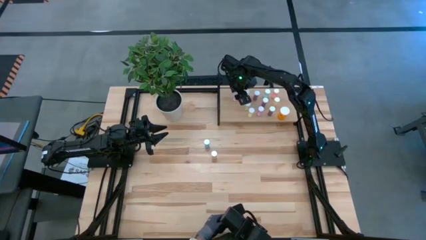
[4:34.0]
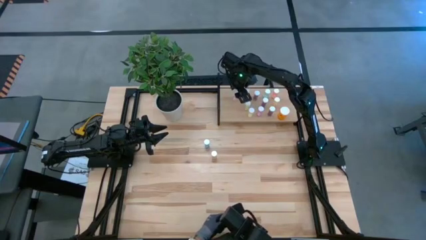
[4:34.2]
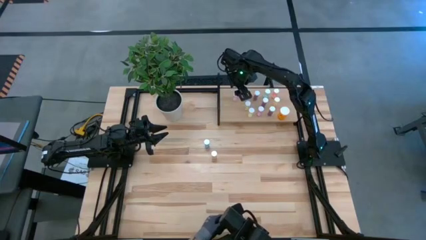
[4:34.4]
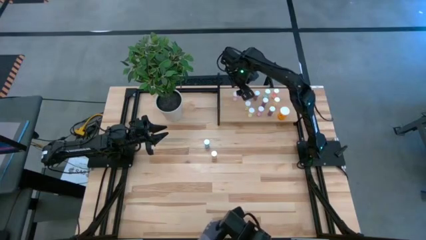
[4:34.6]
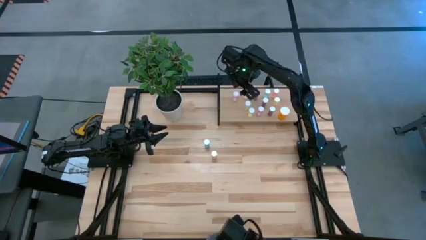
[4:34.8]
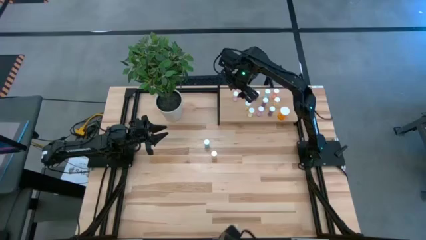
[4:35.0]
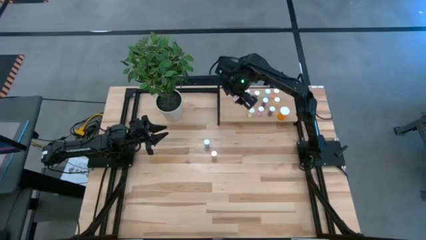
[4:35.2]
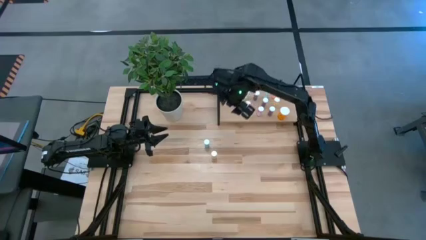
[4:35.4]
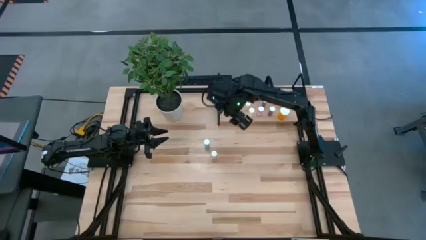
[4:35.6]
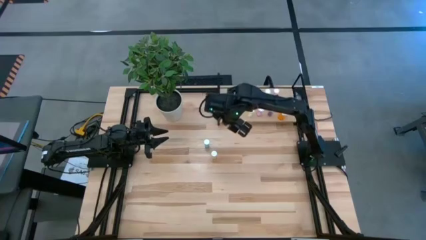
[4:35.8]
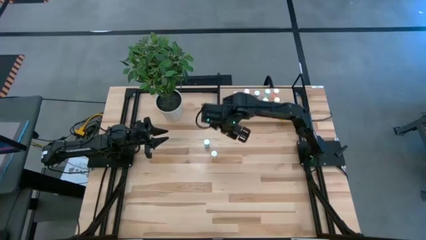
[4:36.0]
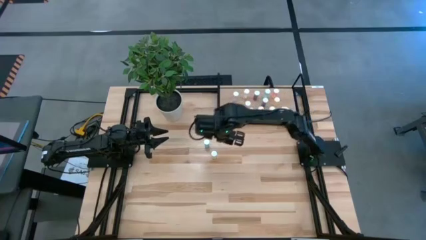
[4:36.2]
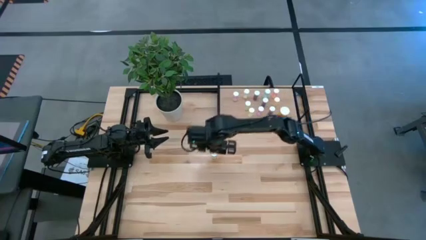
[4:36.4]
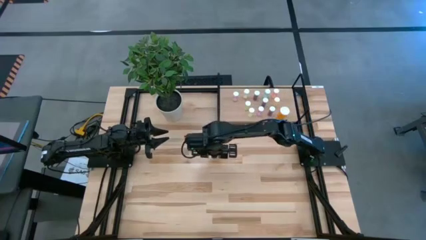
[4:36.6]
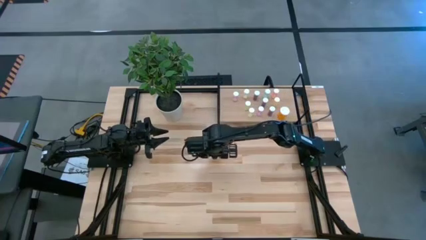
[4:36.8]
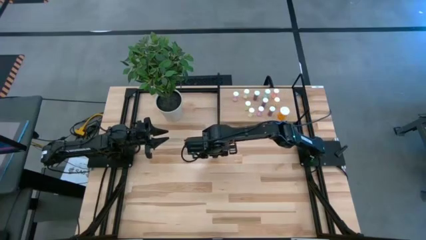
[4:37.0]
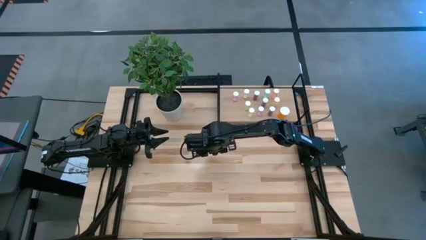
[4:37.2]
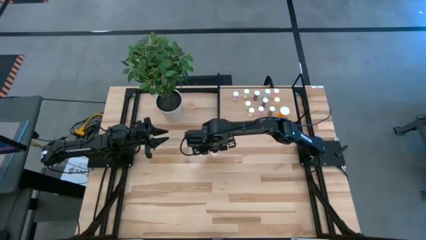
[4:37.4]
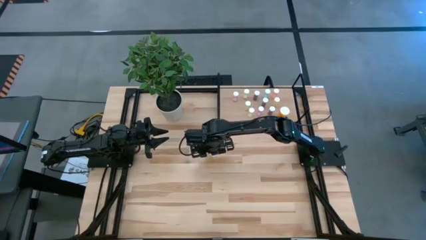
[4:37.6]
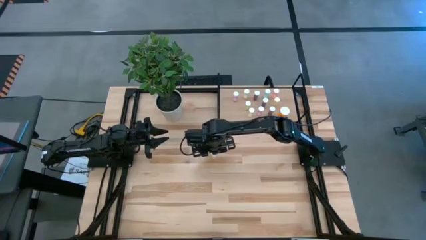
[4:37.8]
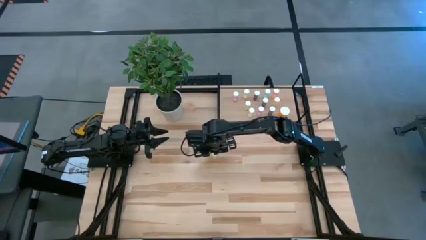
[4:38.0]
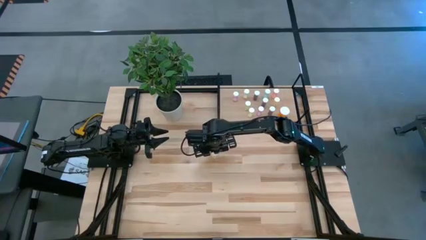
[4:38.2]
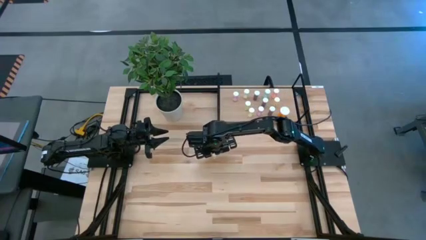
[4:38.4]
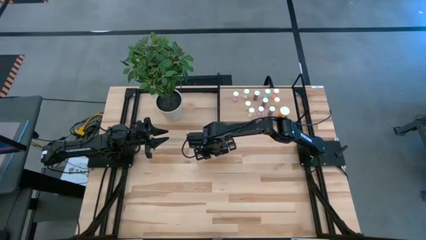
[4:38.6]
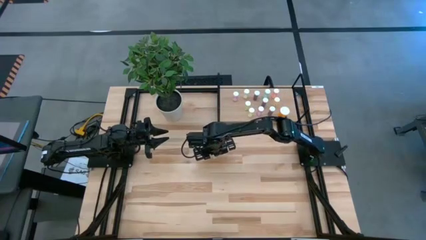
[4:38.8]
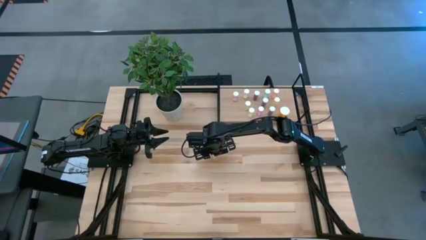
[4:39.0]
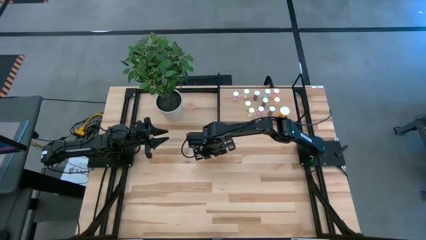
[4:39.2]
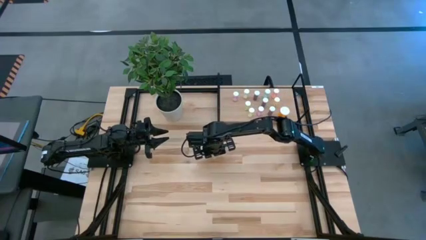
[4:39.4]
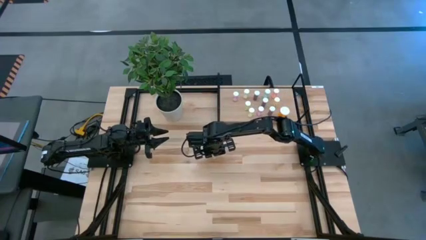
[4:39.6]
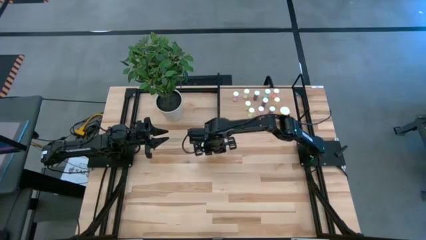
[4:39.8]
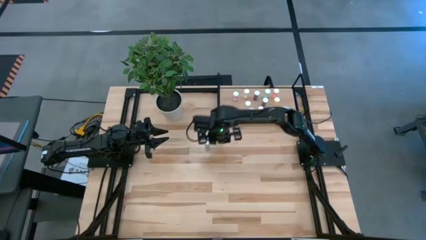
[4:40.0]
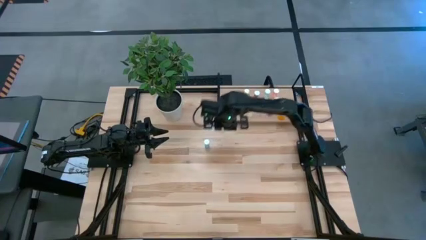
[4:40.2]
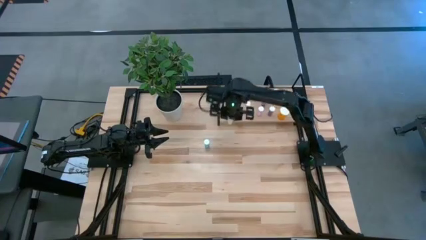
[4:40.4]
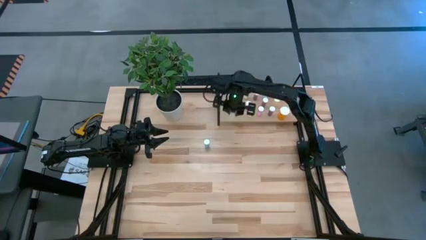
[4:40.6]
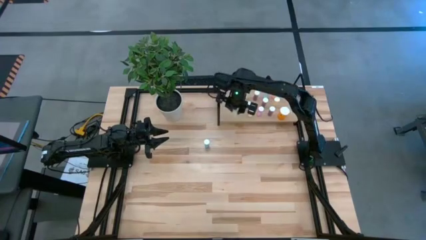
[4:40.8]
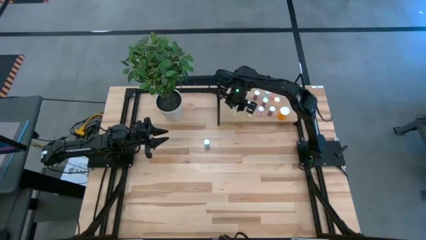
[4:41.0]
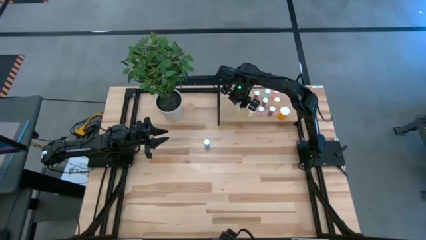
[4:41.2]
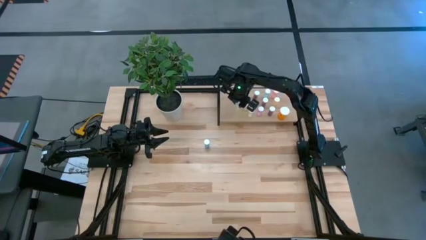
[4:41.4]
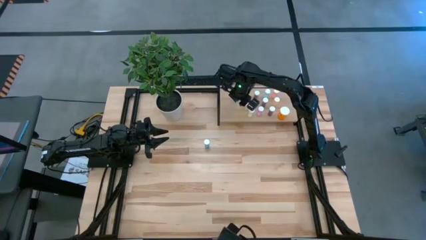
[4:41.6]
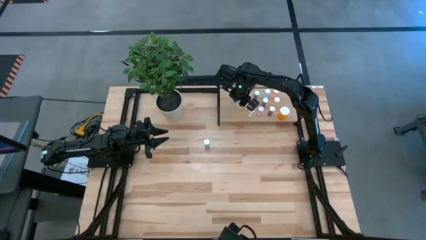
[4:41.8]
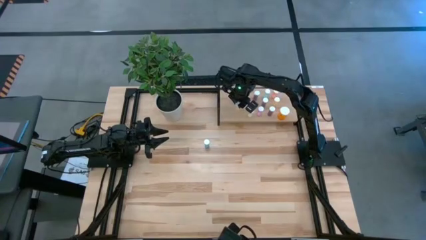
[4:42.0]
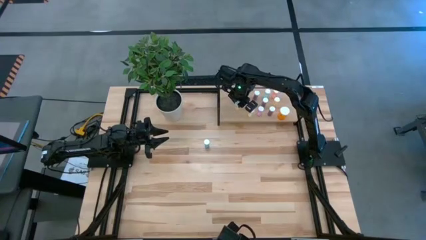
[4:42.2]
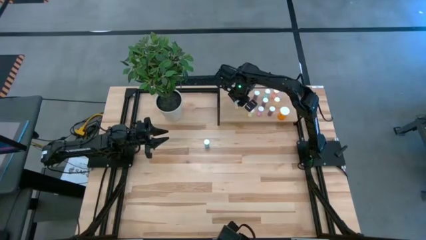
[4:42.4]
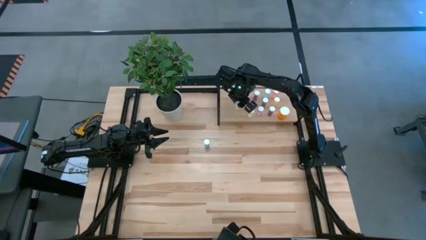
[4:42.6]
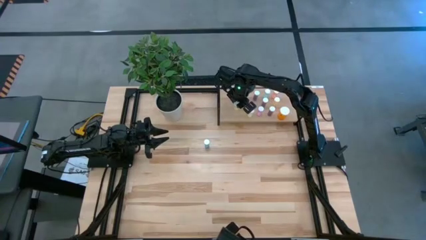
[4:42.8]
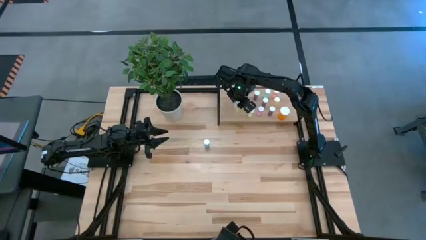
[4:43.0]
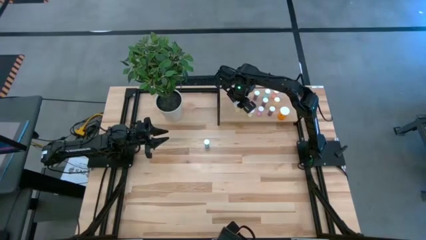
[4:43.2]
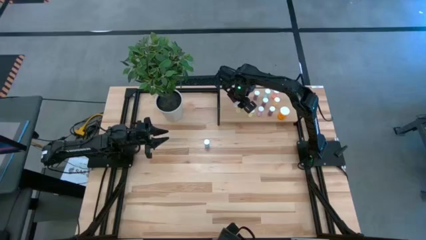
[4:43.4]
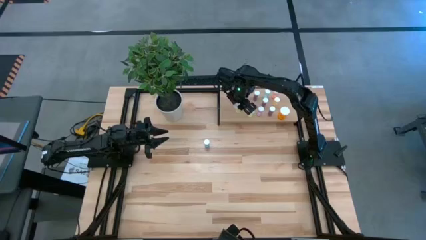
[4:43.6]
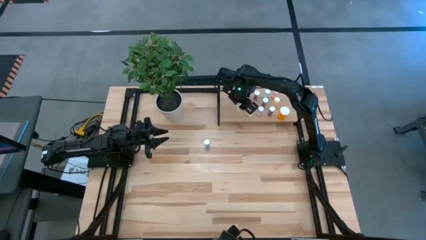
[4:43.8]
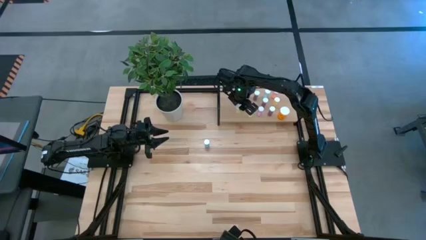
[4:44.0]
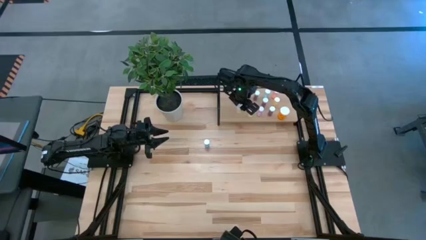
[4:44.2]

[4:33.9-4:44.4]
Task: Pick and place medicine bottles onto shelf by color
Put the yellow pill bottle on the shelf

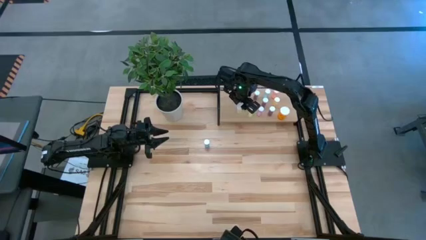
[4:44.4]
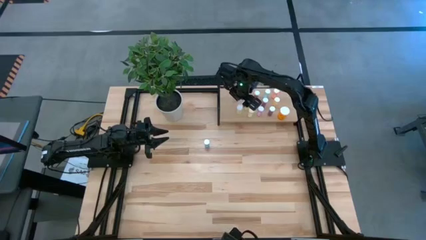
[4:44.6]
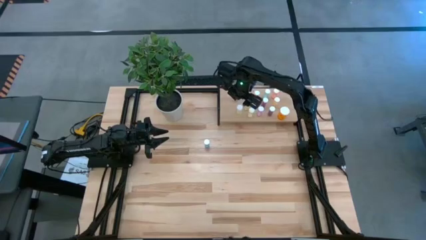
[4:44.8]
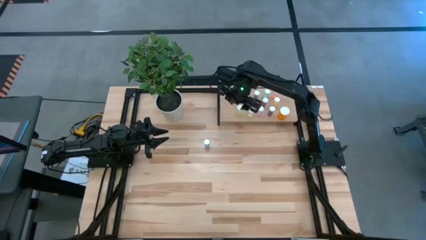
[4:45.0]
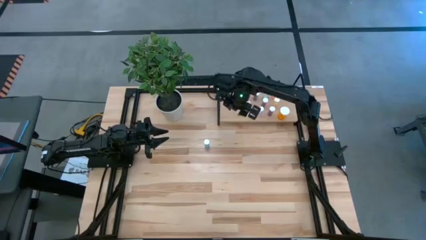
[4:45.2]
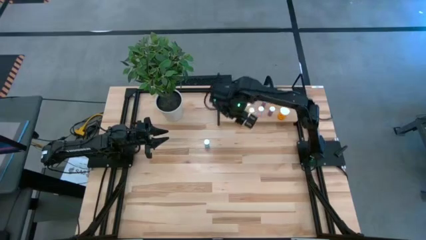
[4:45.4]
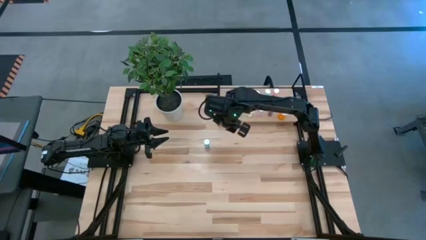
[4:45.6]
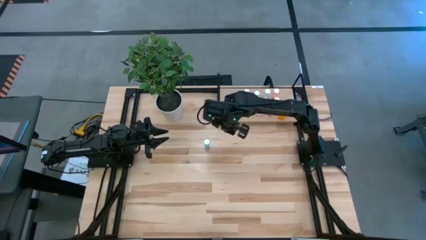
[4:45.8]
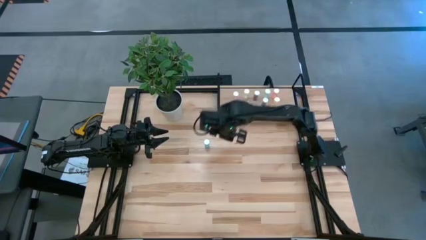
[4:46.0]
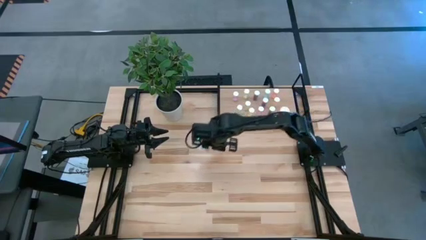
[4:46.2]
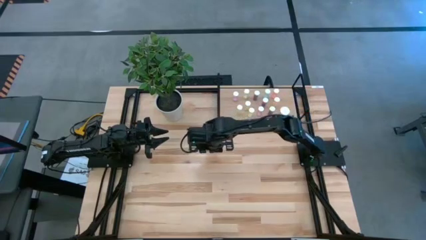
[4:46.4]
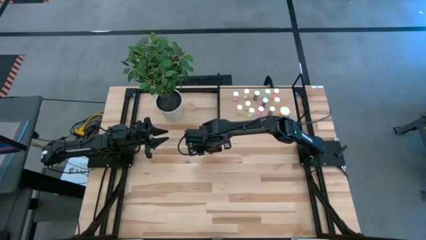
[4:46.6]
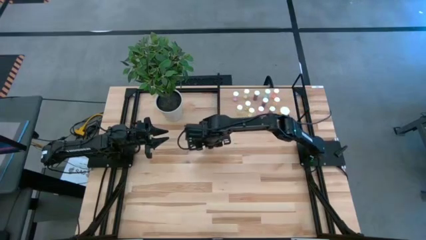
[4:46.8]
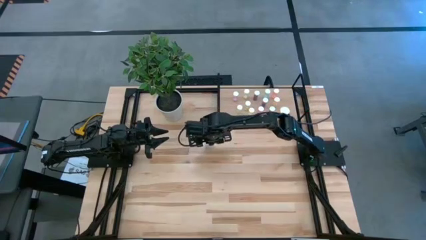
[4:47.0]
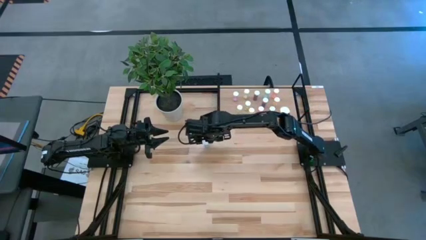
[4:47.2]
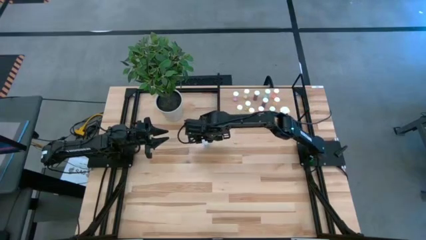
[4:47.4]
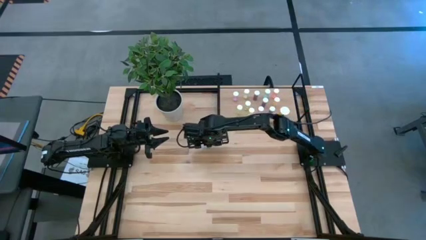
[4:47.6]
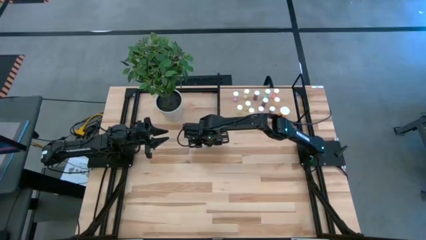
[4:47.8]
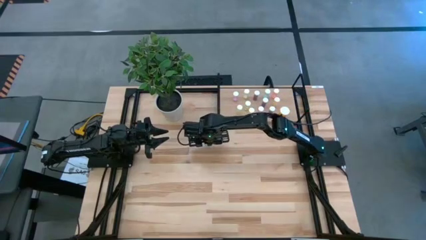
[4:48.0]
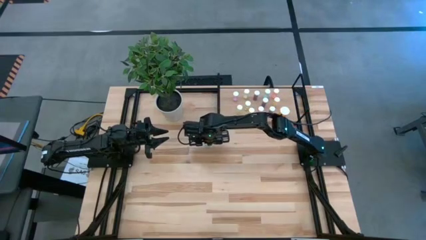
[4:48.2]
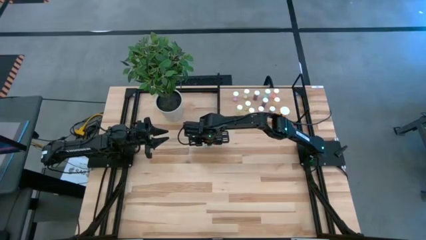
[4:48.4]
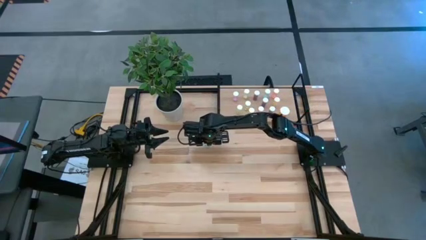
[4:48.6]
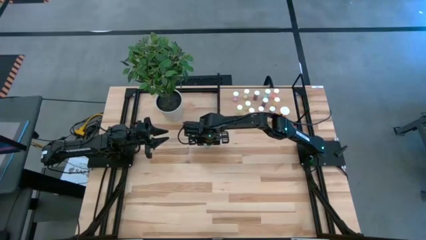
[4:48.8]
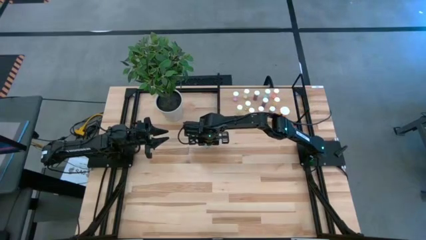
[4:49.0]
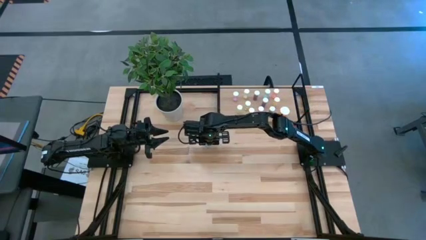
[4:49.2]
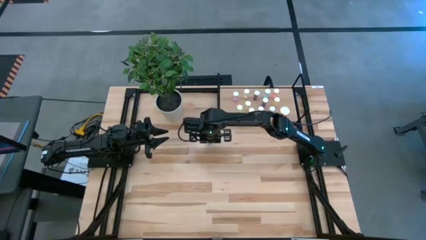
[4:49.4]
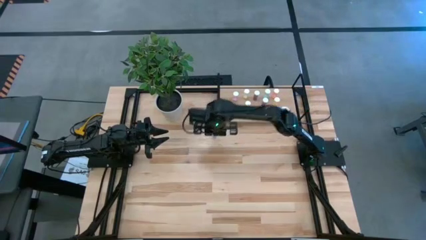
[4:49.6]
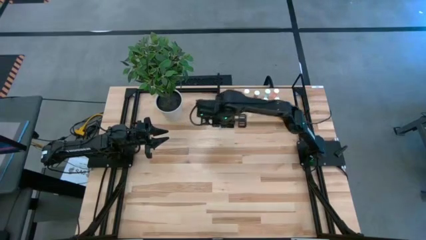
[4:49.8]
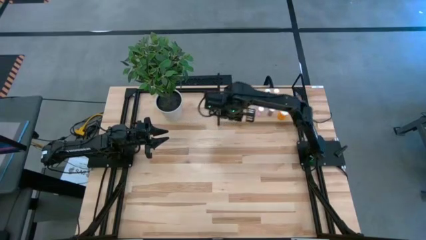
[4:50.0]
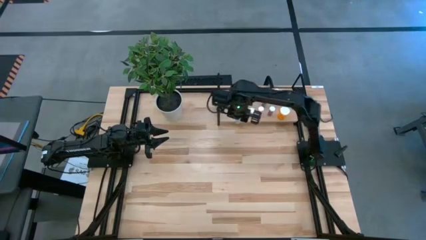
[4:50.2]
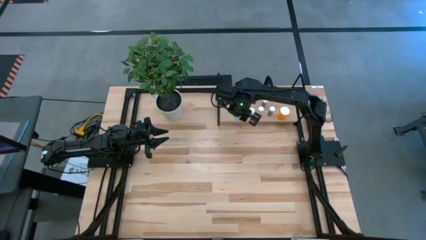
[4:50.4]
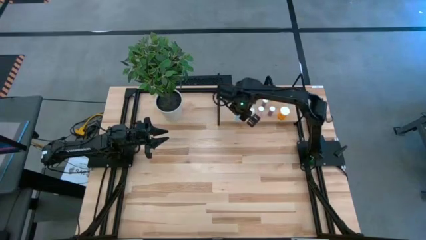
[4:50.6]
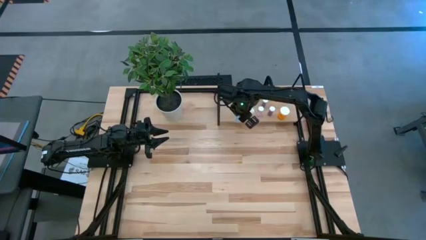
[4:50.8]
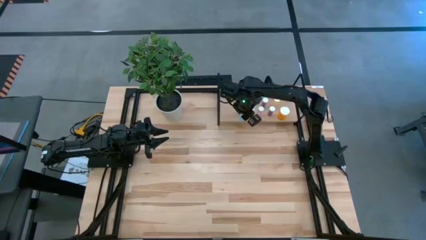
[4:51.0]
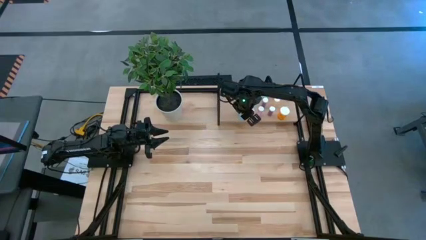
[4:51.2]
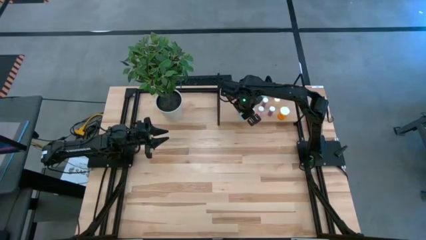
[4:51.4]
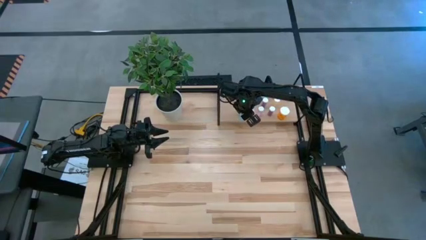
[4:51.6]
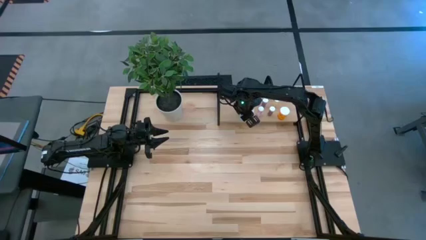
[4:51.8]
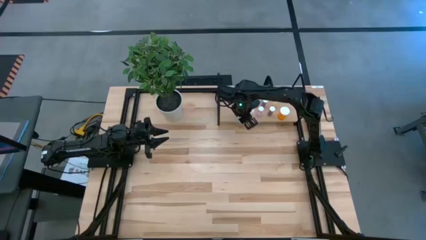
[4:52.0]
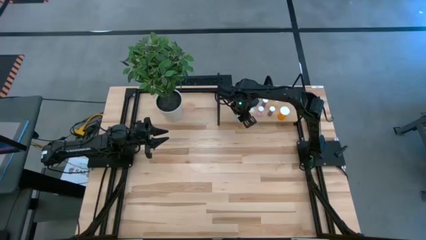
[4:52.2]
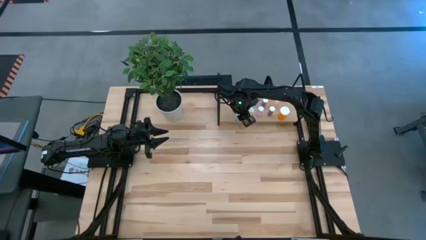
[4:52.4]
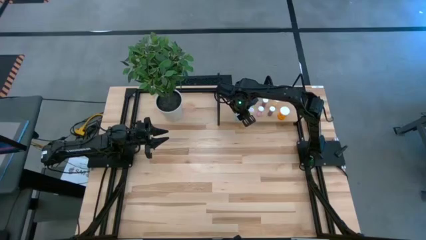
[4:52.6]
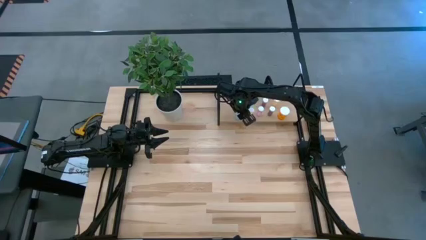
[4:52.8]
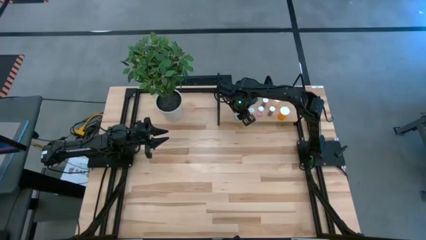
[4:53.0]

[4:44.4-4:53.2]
Put the blue pill bottle on the shelf
